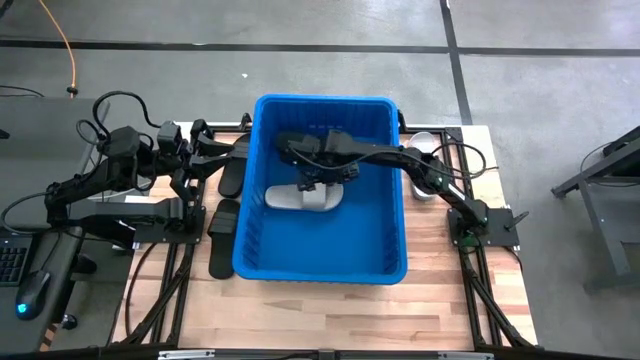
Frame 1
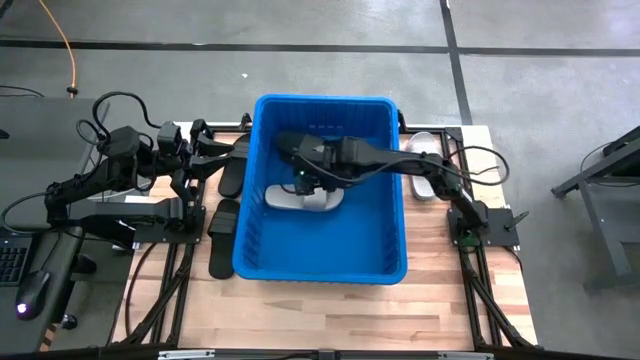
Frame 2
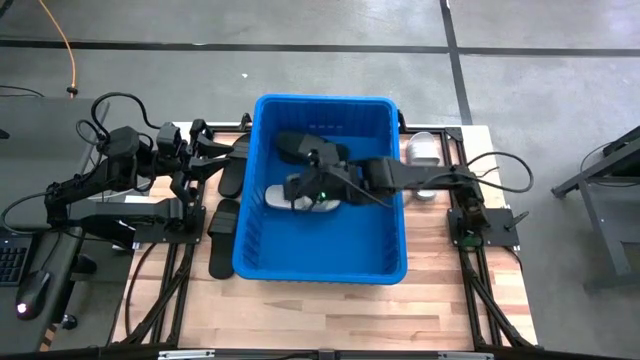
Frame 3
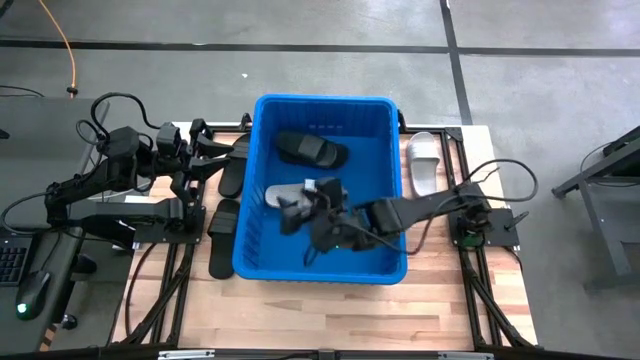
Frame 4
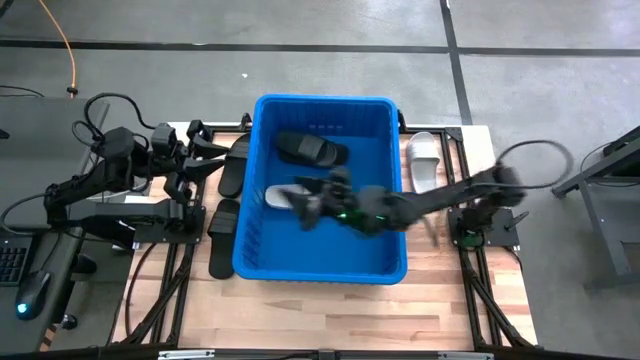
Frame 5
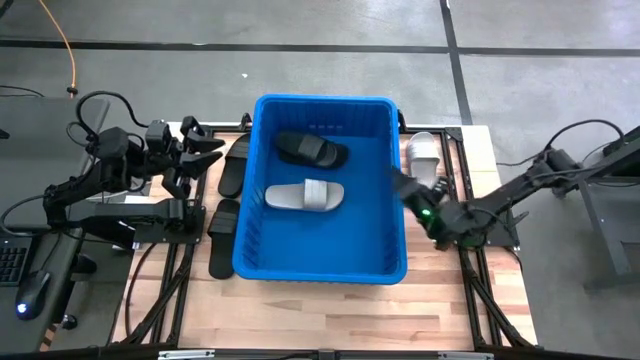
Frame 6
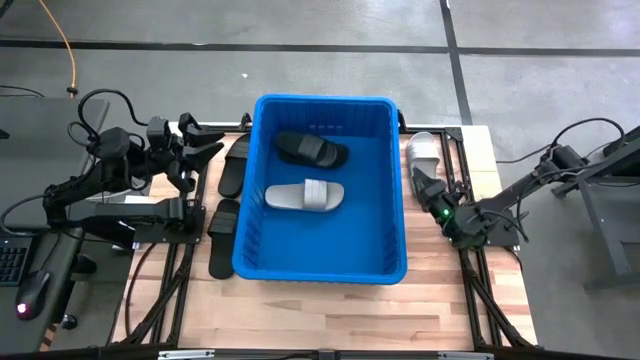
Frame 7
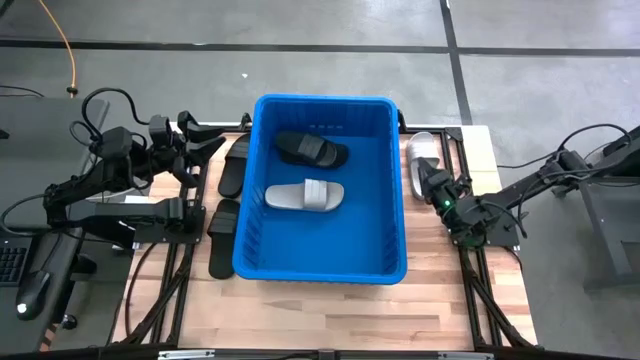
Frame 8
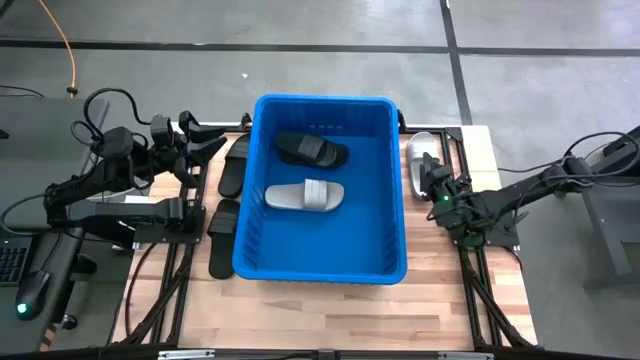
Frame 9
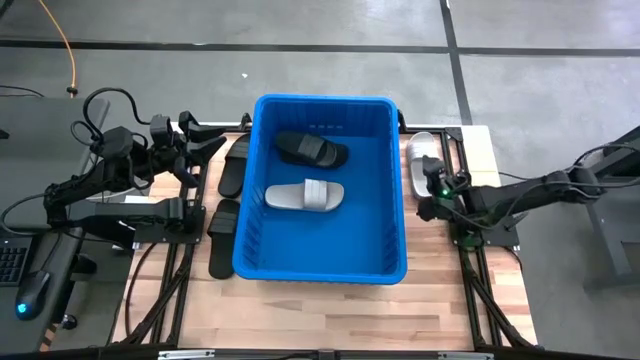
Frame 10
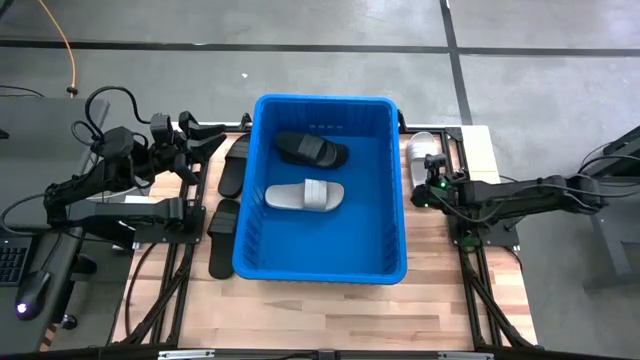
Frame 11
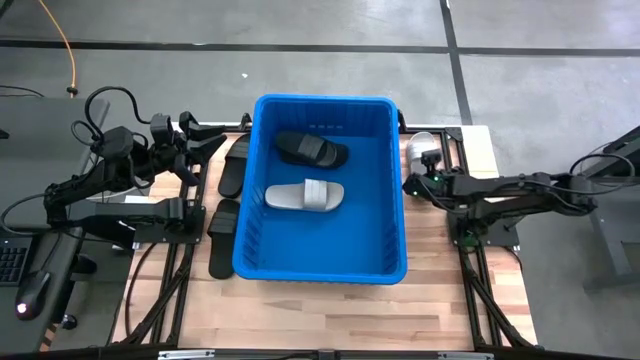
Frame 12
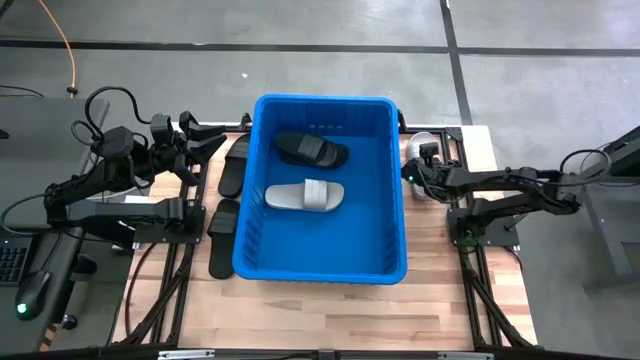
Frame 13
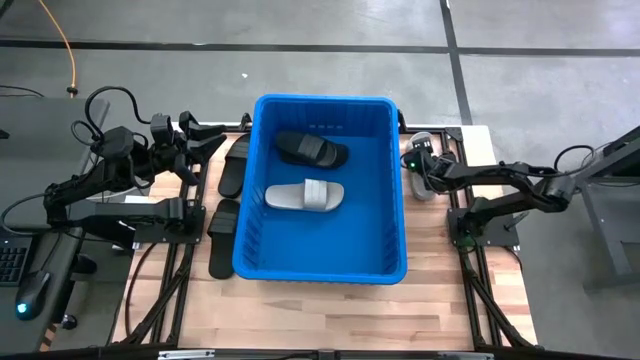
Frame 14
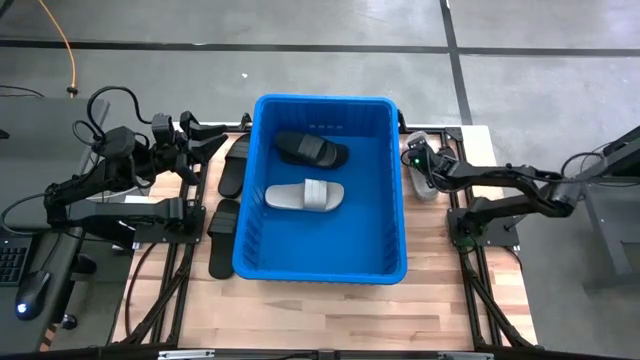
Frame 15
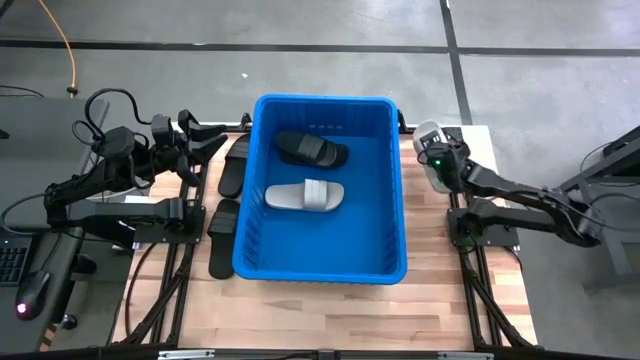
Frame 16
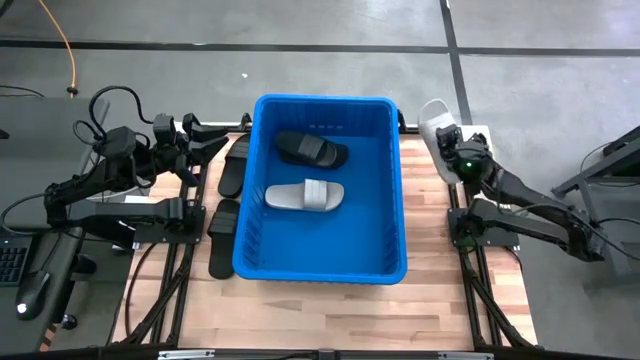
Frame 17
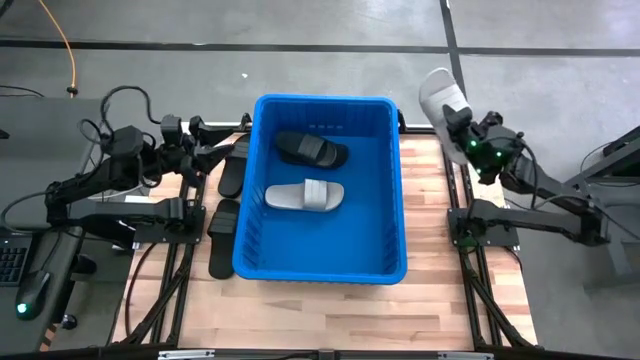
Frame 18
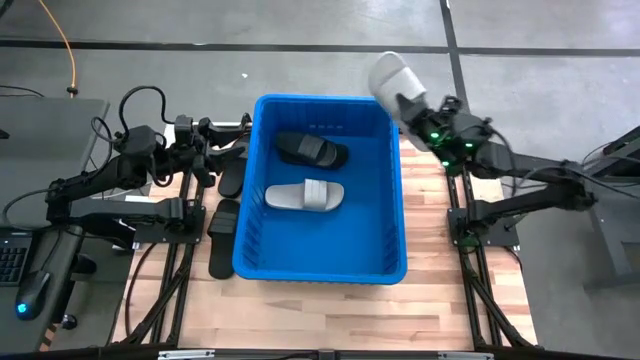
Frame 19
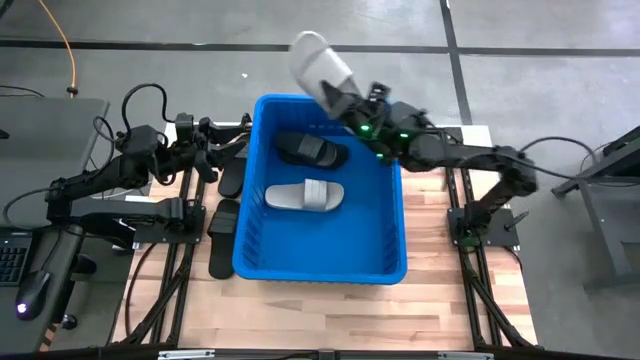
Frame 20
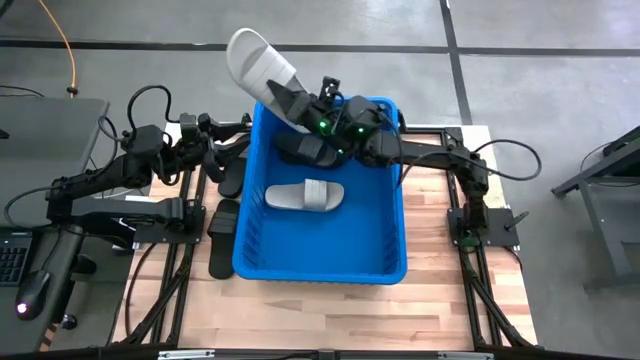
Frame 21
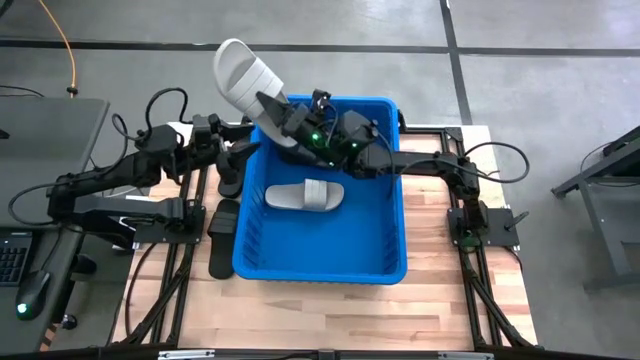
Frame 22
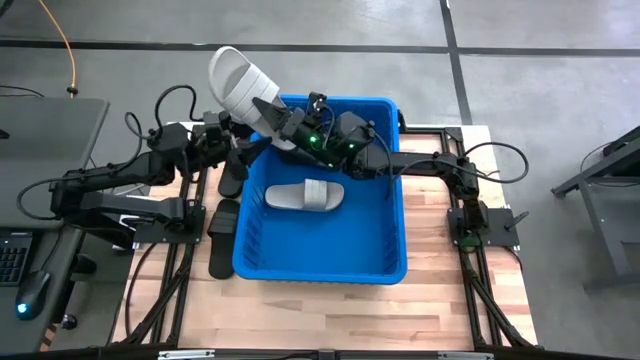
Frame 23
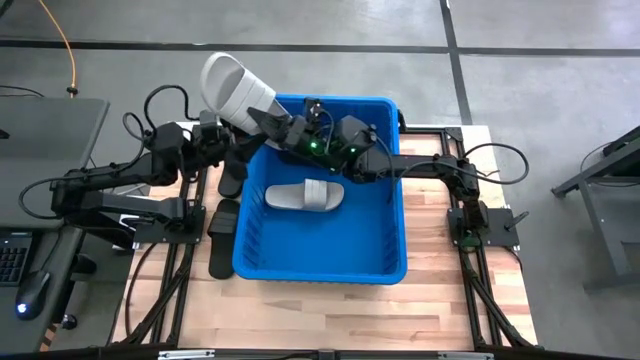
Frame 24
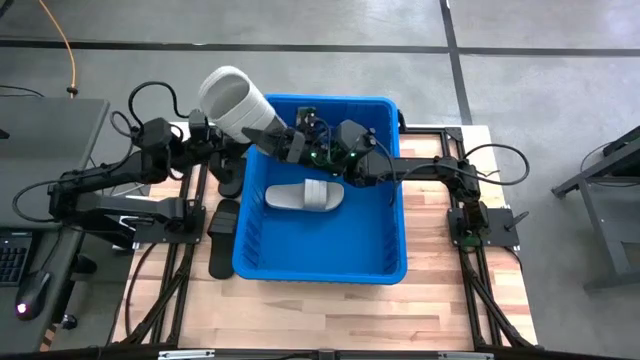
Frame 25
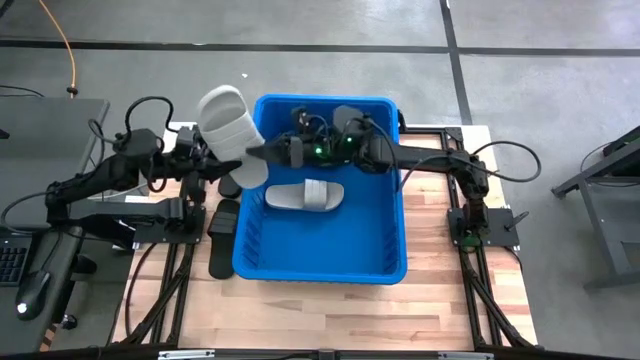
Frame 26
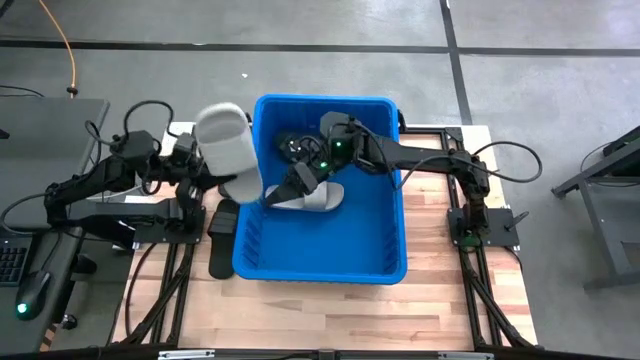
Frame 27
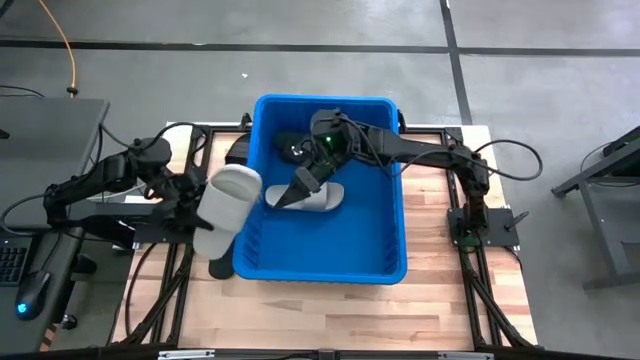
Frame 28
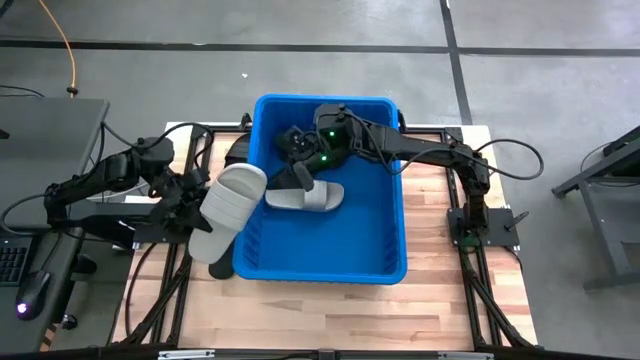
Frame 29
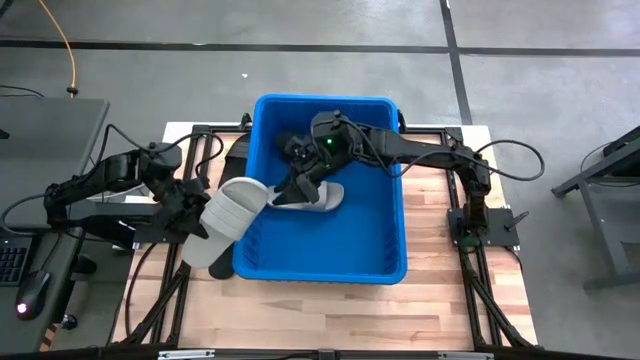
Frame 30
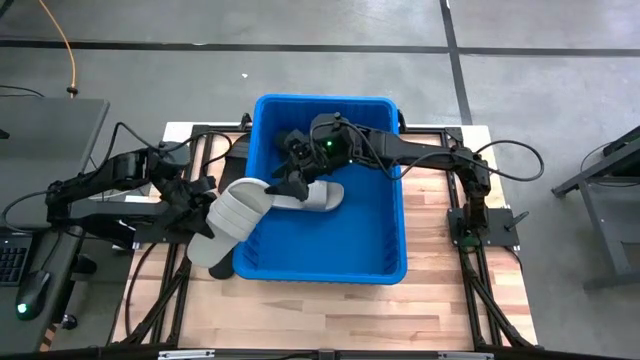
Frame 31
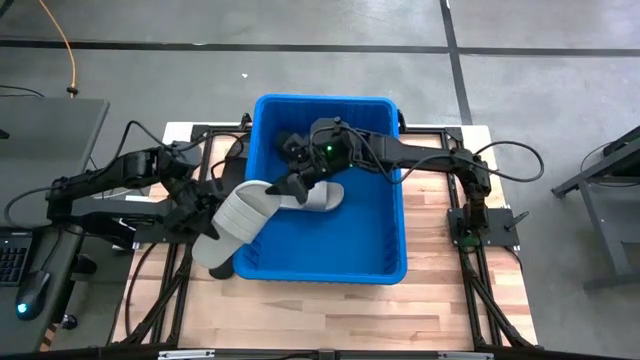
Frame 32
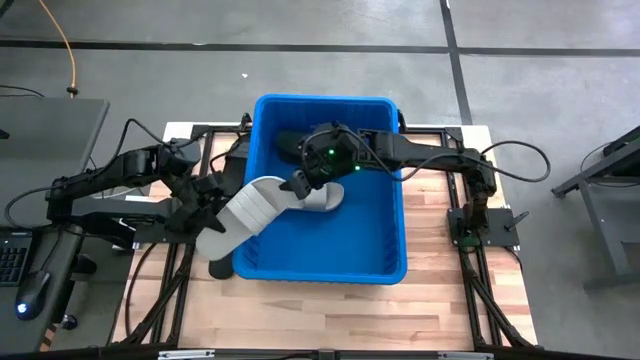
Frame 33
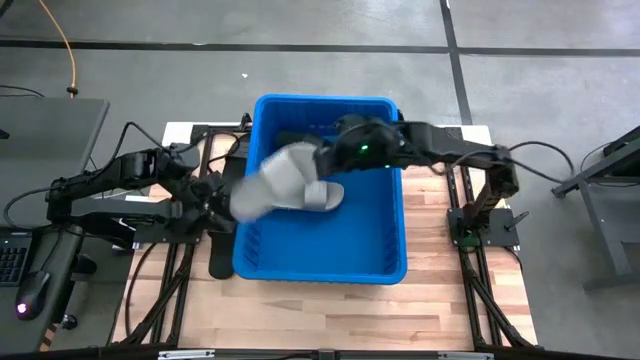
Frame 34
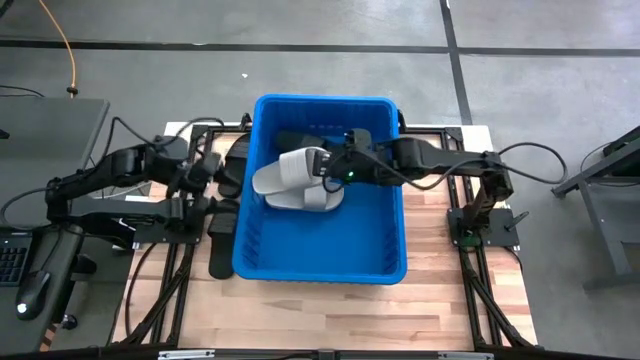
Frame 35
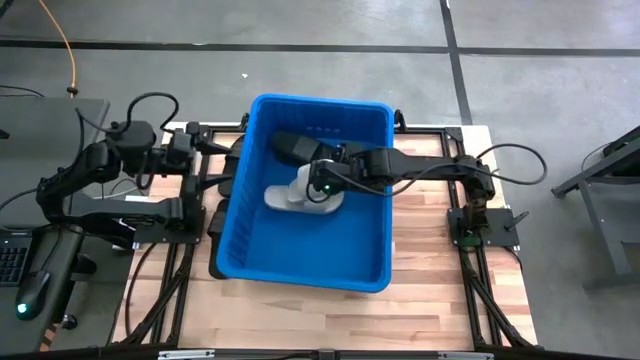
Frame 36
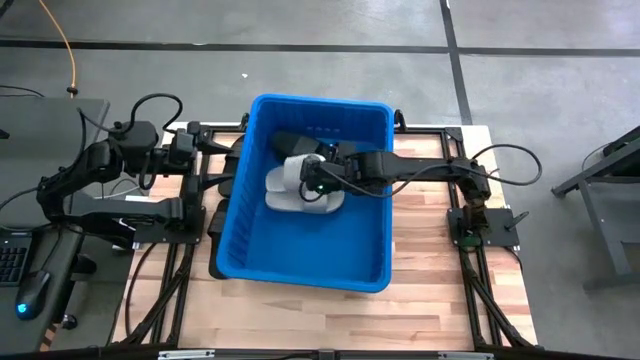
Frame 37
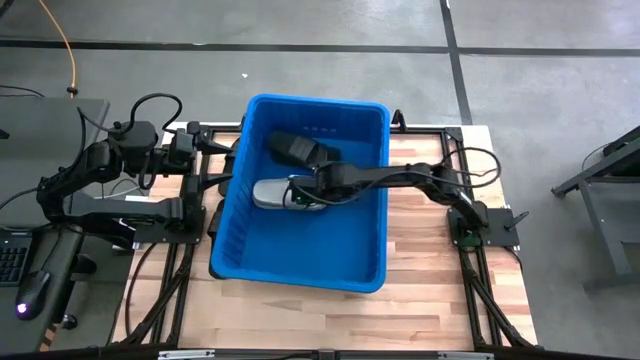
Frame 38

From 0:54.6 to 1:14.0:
Task: Pick and place slides into bin
Put the white slide into the blue container

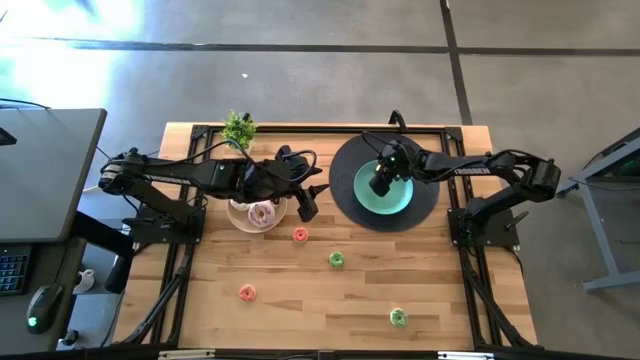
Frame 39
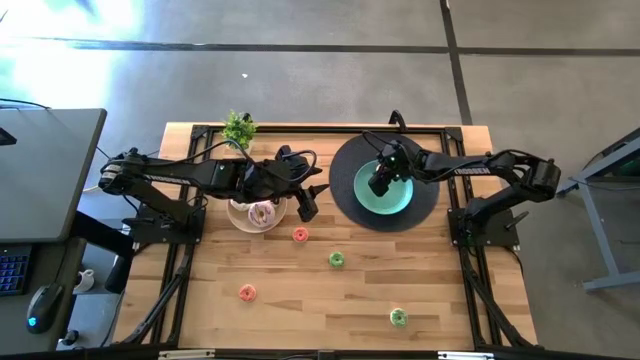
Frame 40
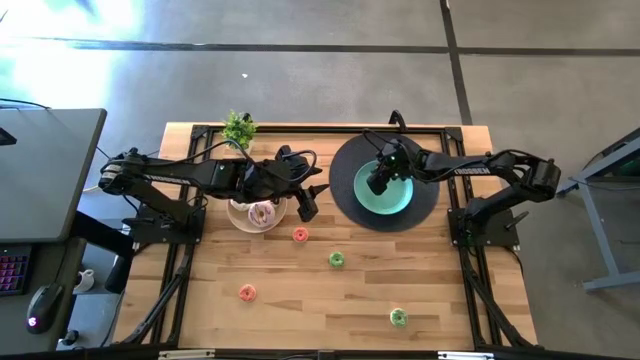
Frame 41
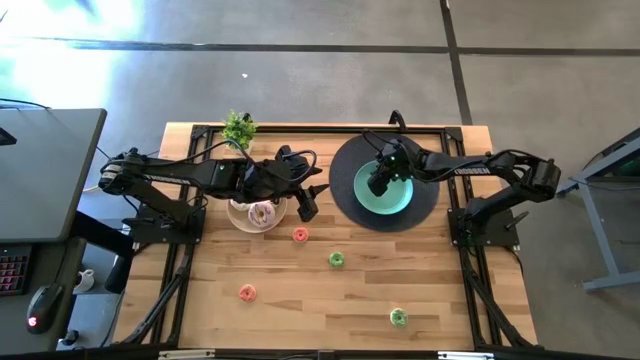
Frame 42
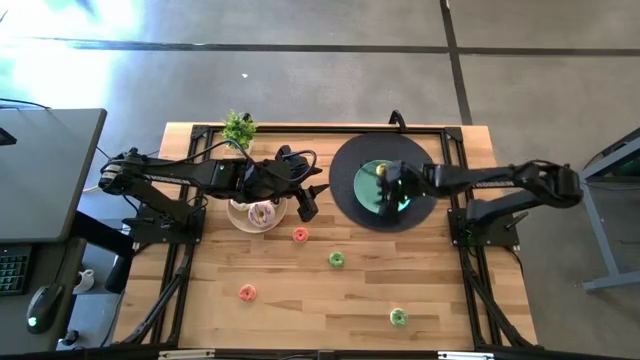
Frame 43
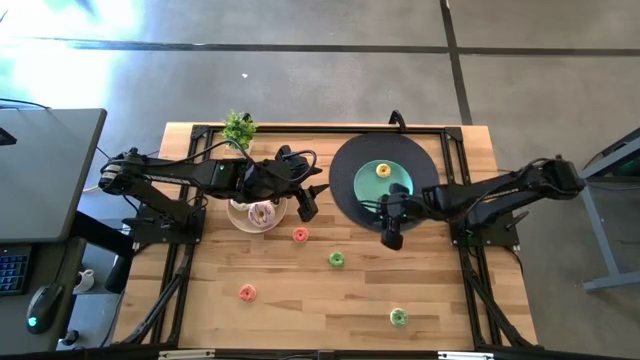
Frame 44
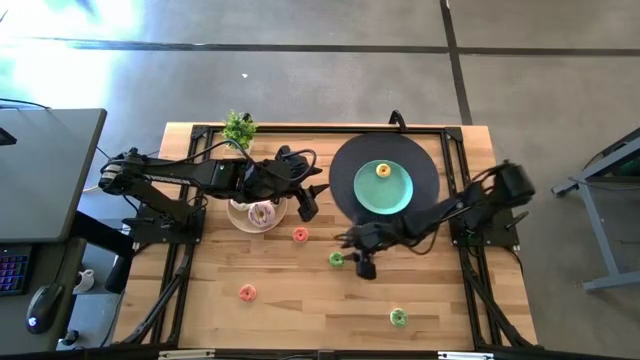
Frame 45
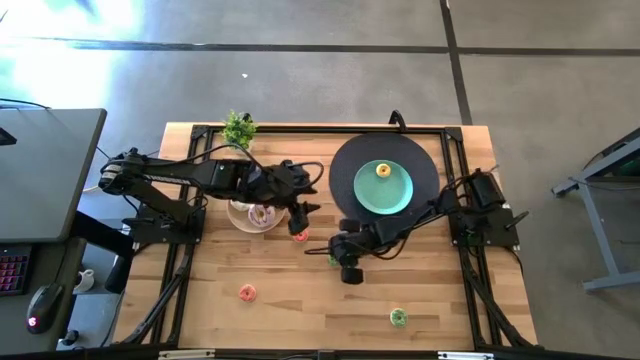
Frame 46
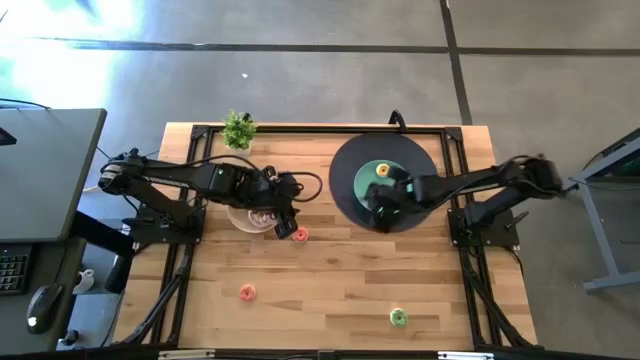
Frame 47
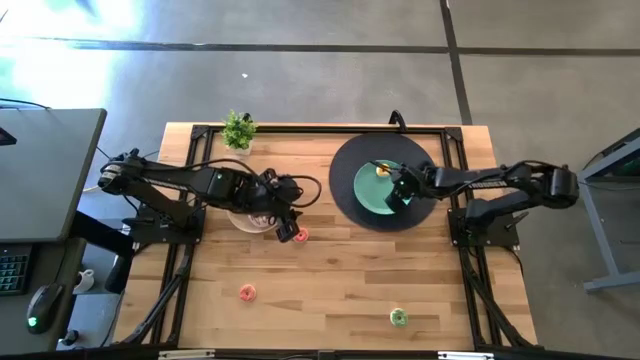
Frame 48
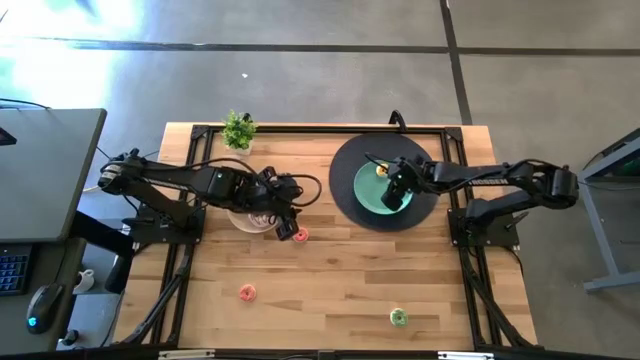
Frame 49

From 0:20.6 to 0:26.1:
Task: Pick & Place donuts
Put the top small green donut on the blue plate
